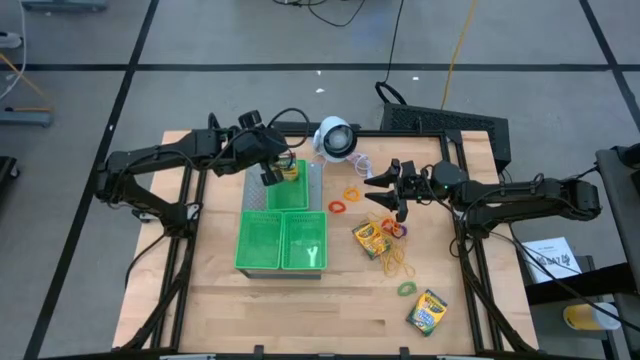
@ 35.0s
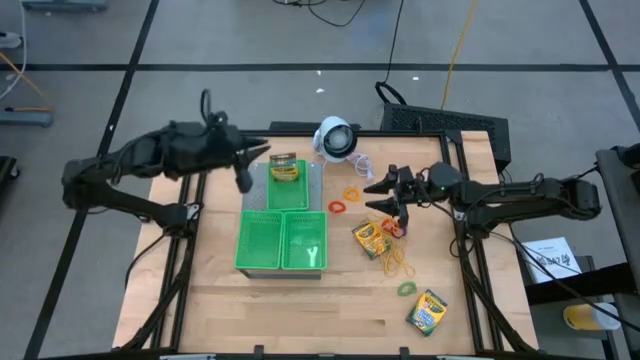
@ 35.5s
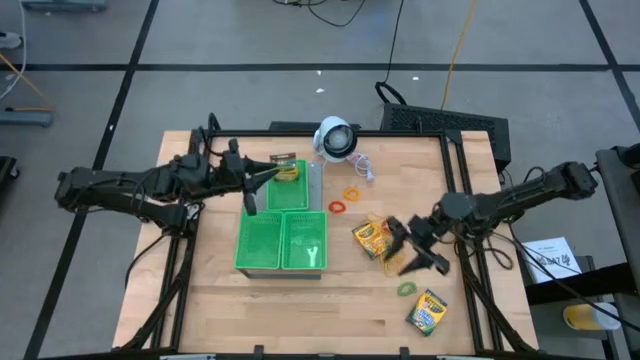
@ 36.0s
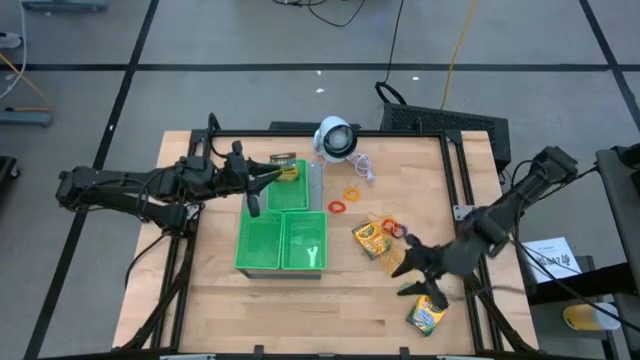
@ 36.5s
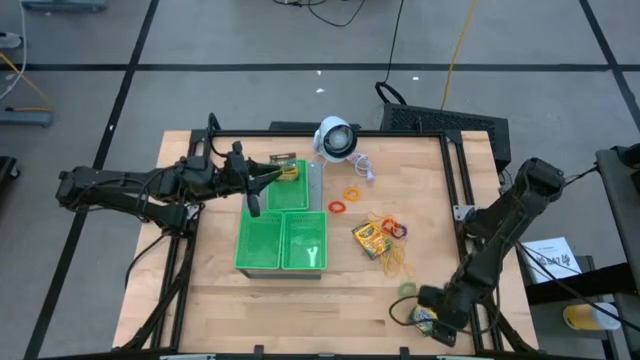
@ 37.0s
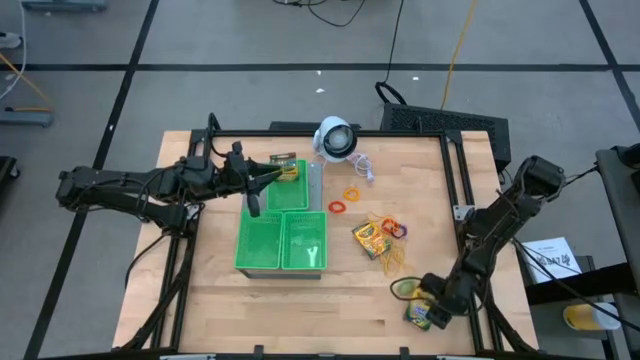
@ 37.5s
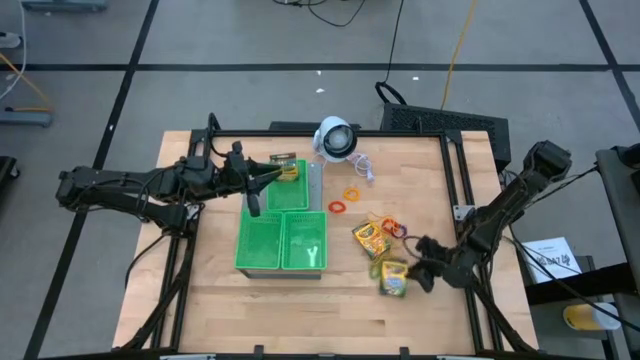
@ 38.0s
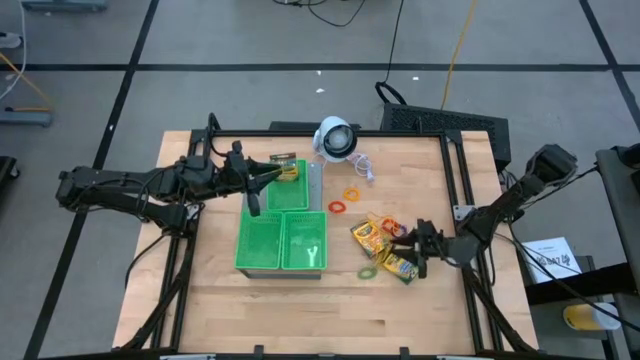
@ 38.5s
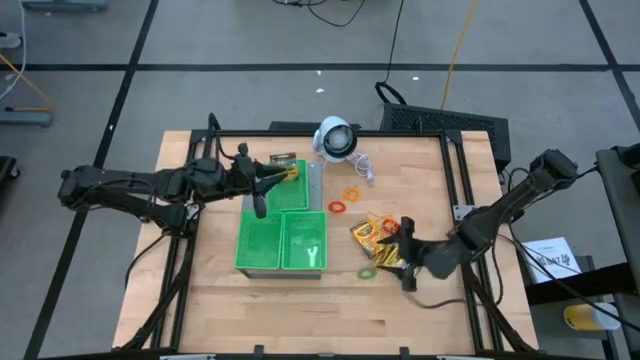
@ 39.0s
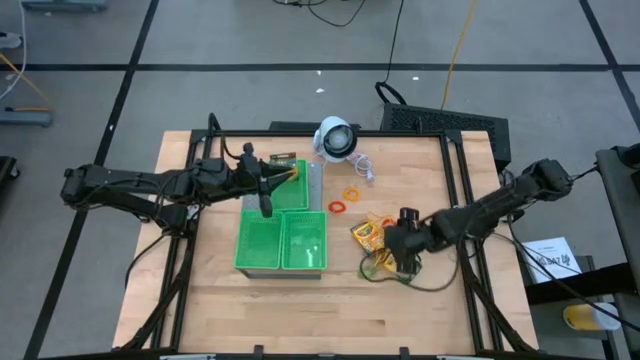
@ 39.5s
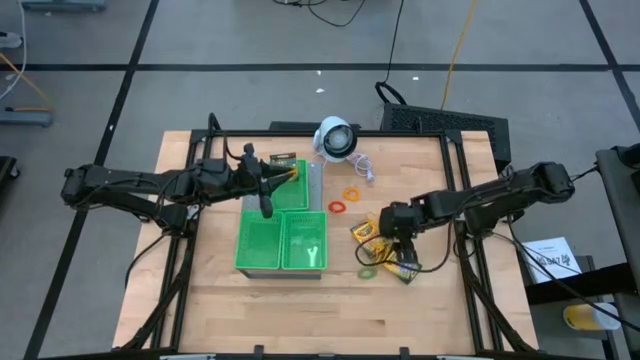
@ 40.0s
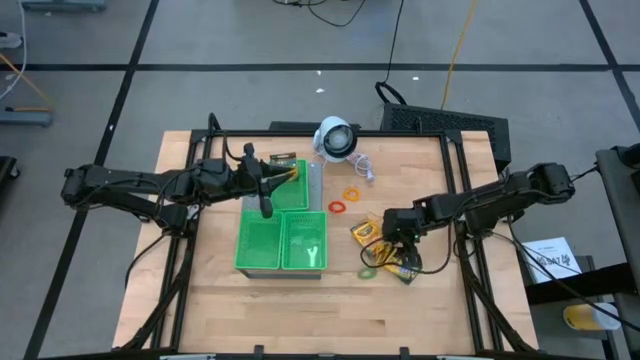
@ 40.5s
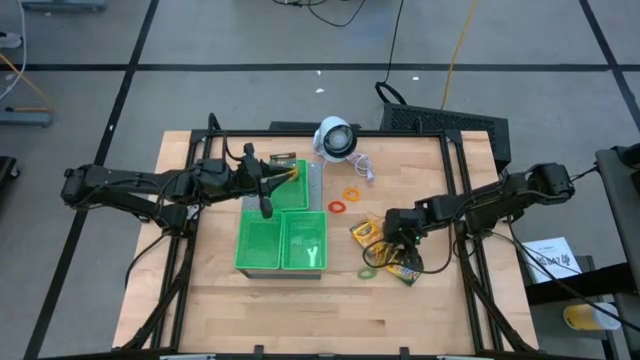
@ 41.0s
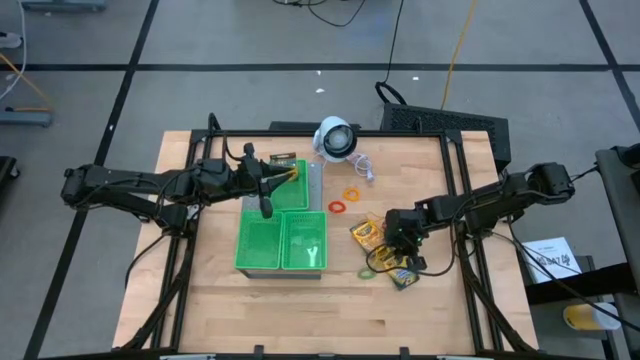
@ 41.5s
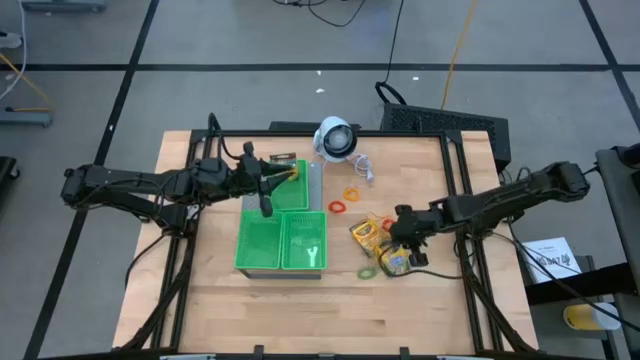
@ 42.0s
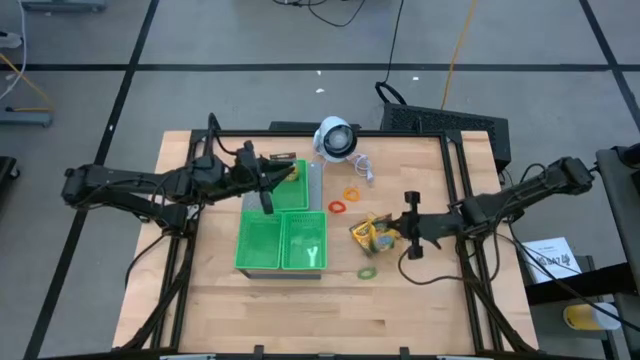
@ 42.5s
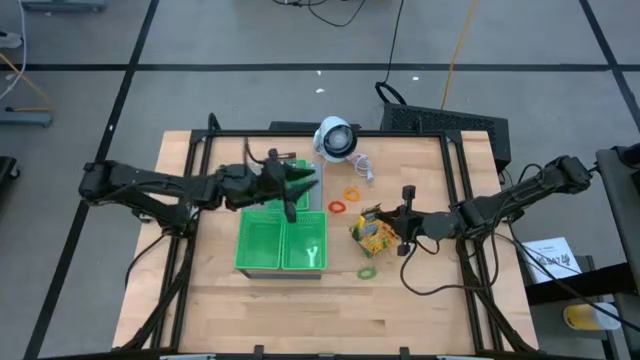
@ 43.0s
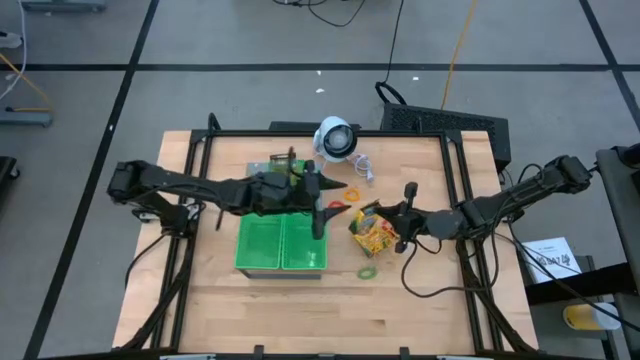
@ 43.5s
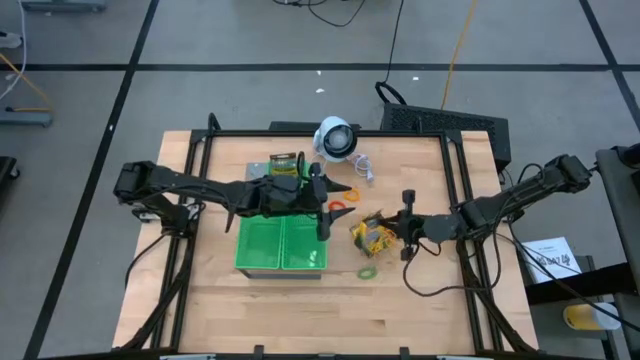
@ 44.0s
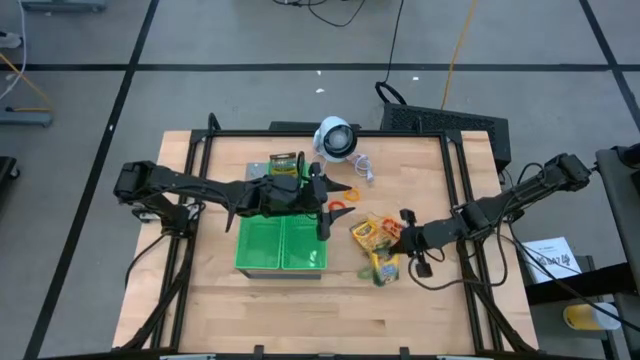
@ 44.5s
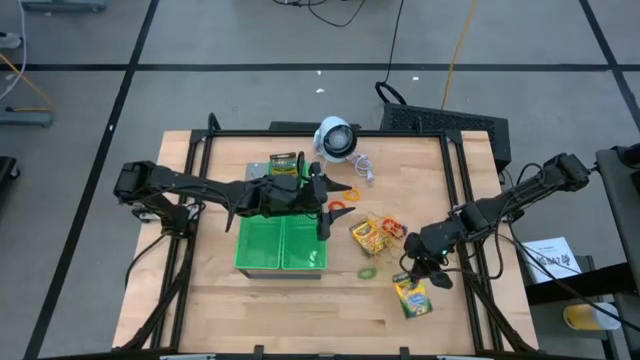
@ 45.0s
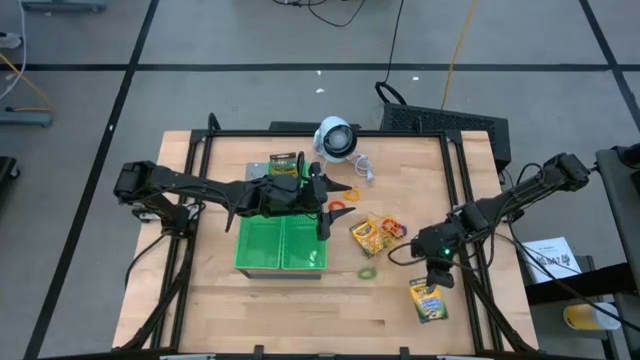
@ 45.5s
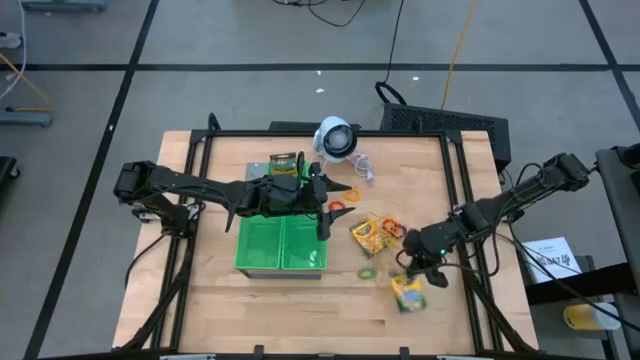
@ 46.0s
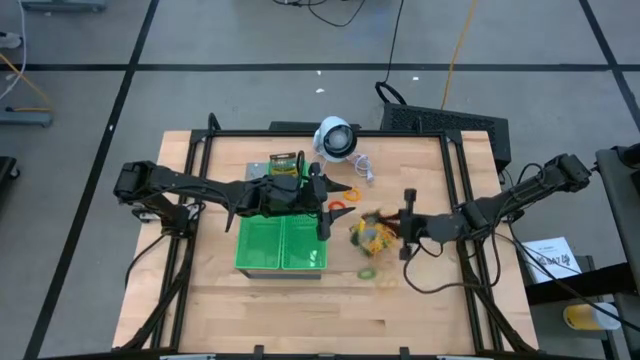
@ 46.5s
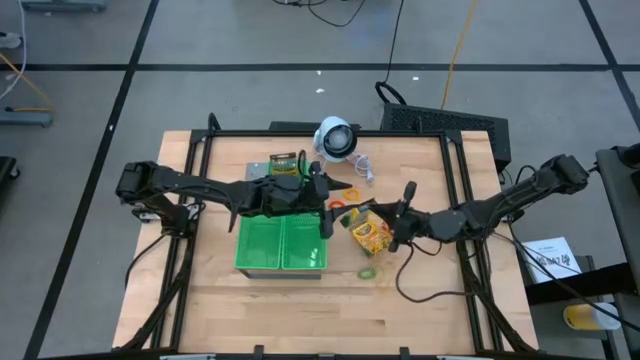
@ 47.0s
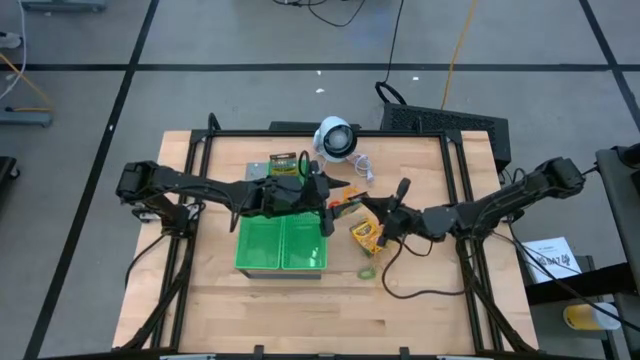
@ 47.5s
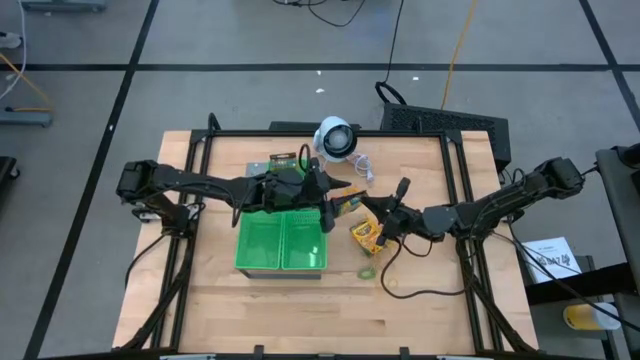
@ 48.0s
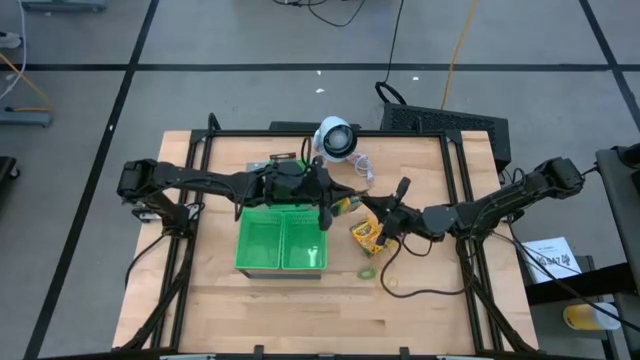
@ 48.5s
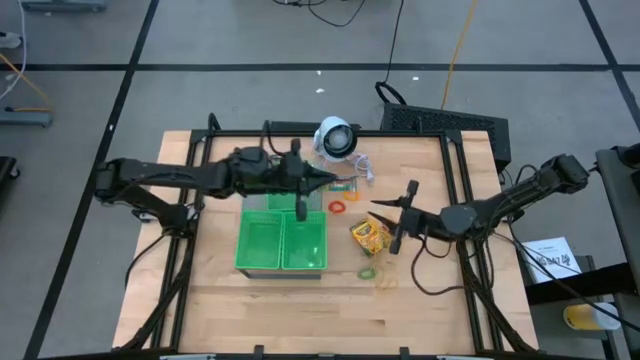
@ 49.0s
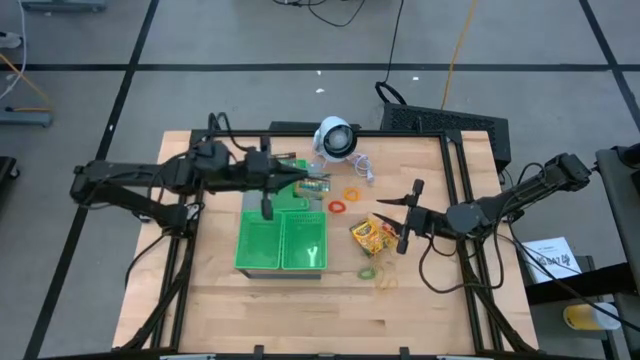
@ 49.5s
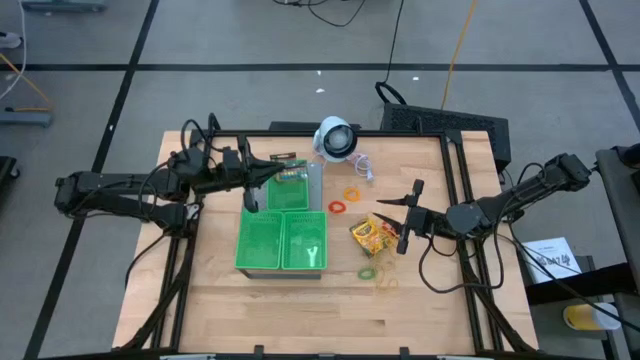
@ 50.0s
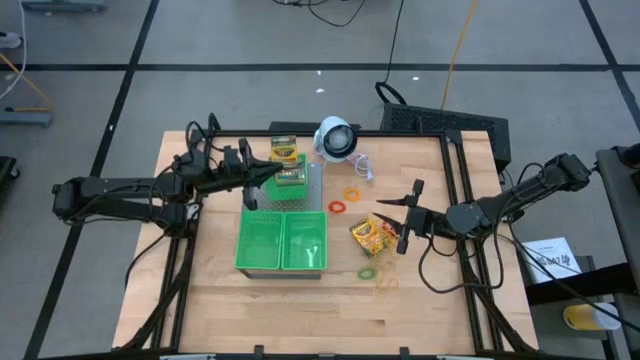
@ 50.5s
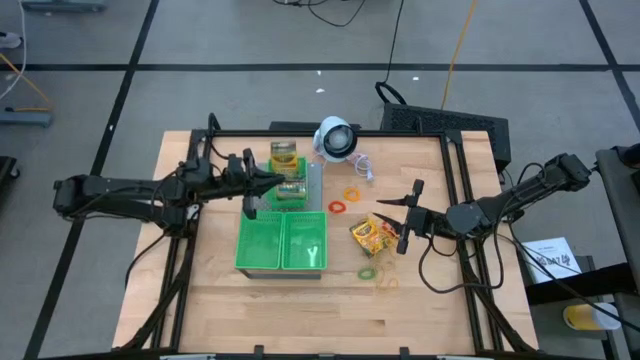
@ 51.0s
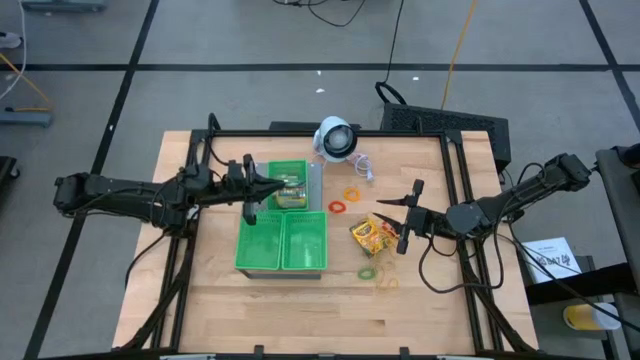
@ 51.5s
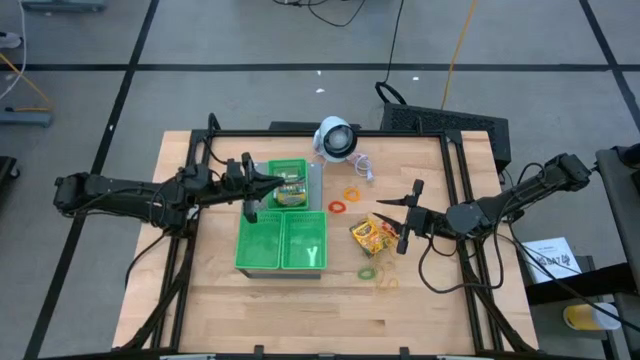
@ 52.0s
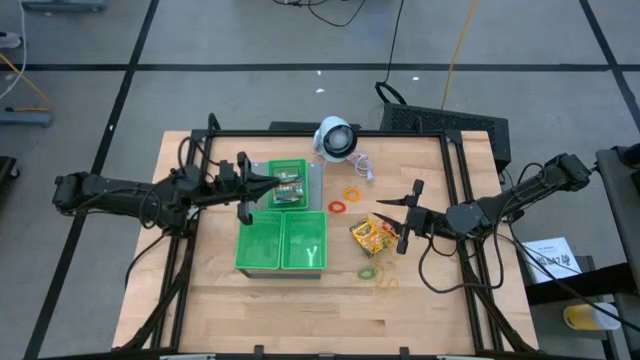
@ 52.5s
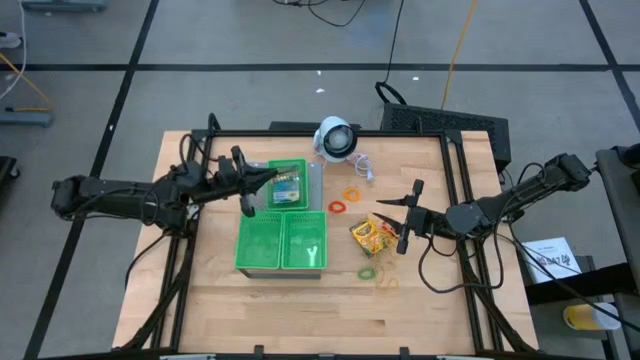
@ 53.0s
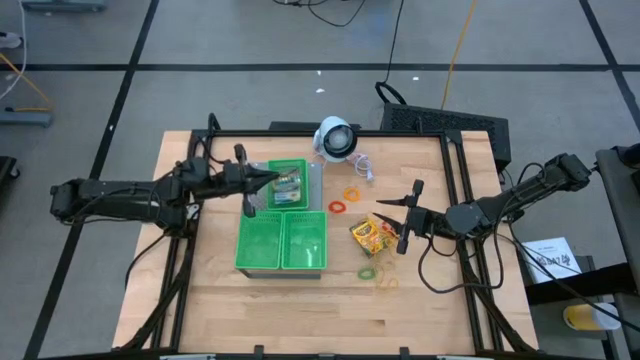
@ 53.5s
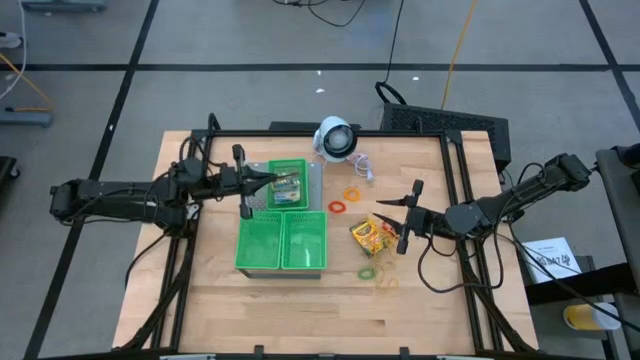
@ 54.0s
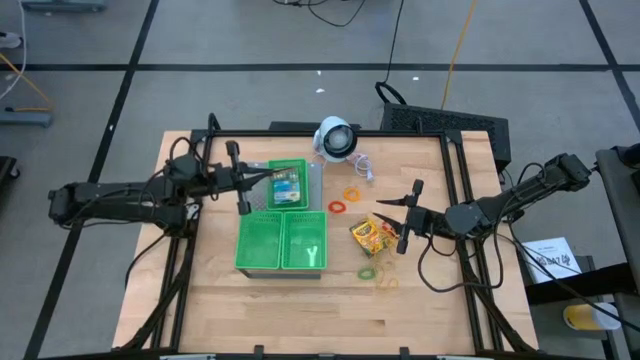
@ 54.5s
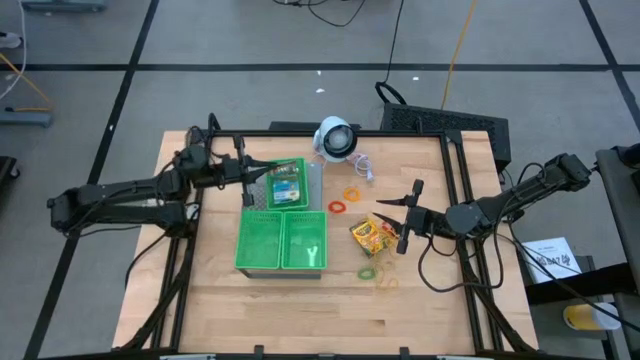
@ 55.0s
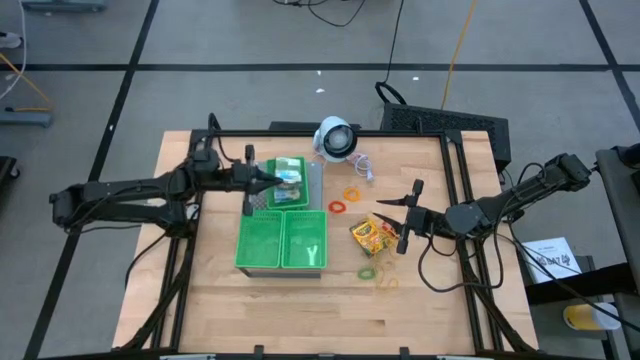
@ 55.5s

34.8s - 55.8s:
Task: Pick & Place Office Desk Supplies
Put the crayon box into the top green basket on the shelf
